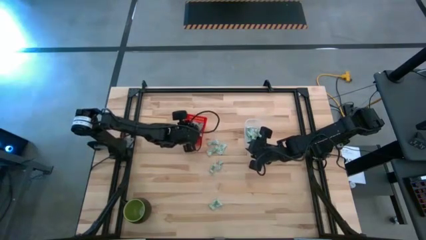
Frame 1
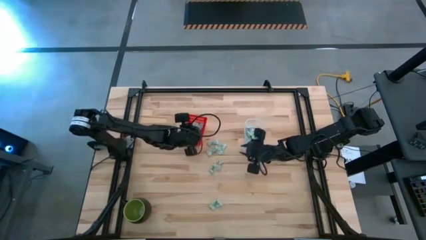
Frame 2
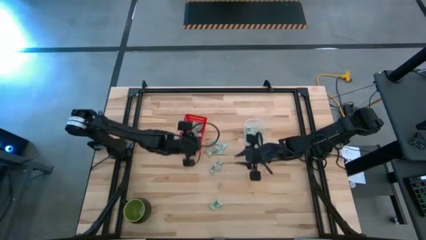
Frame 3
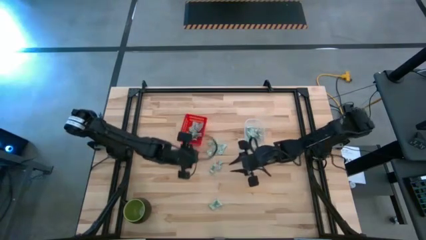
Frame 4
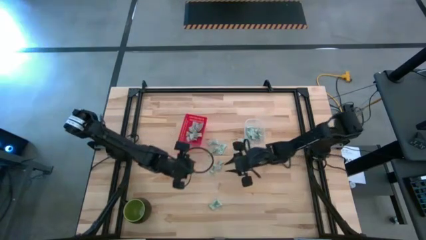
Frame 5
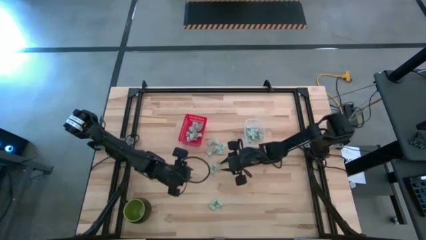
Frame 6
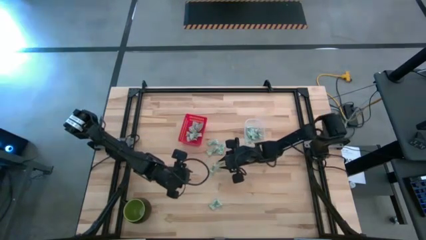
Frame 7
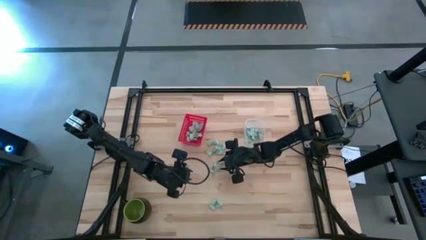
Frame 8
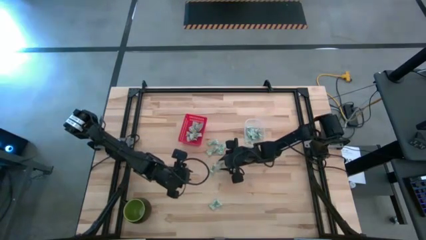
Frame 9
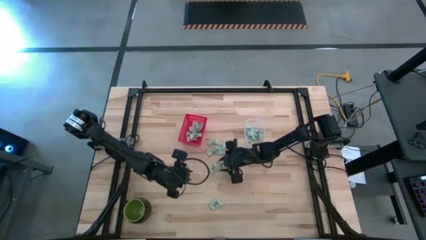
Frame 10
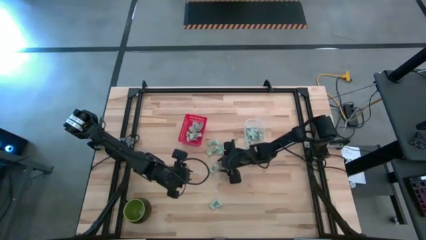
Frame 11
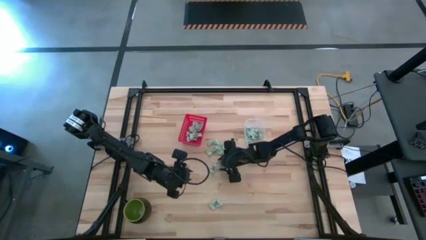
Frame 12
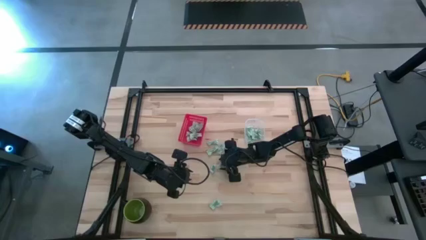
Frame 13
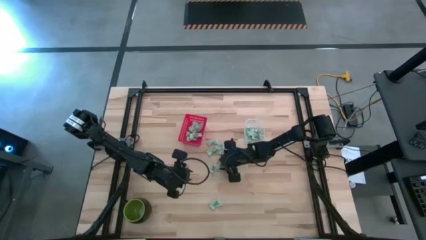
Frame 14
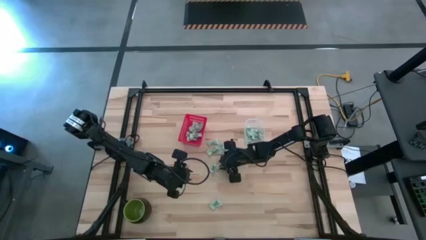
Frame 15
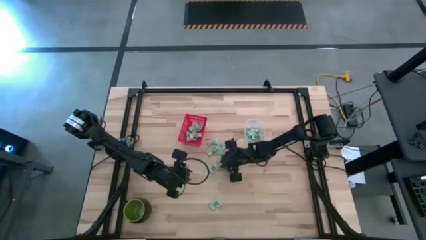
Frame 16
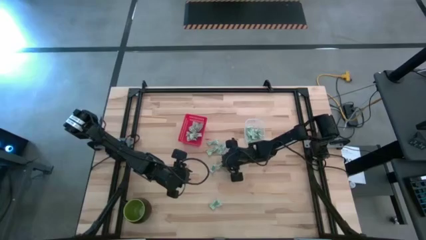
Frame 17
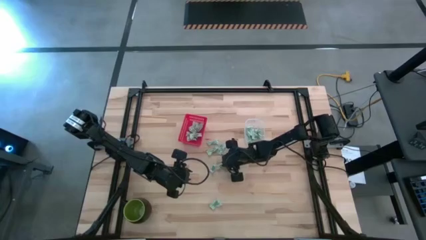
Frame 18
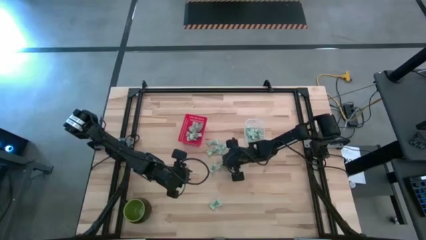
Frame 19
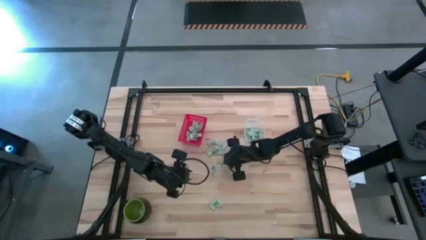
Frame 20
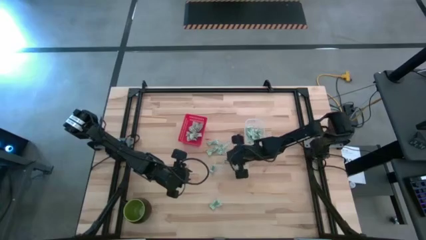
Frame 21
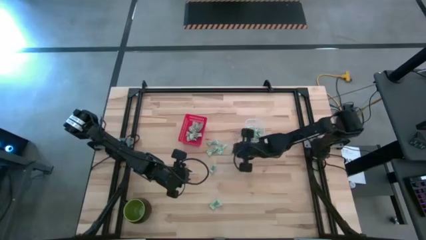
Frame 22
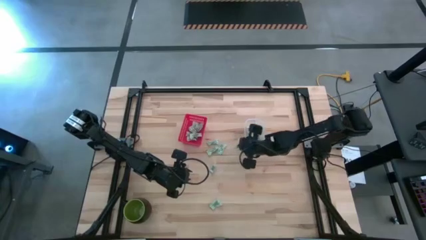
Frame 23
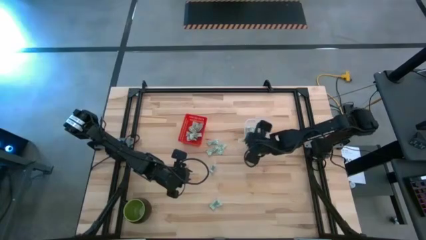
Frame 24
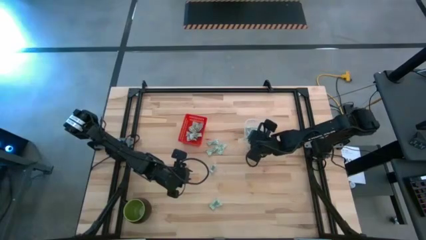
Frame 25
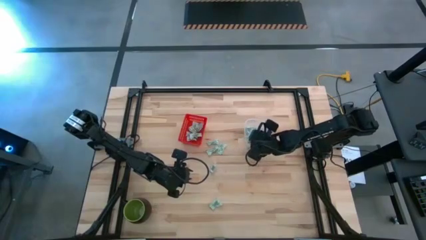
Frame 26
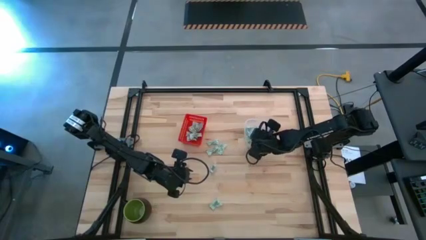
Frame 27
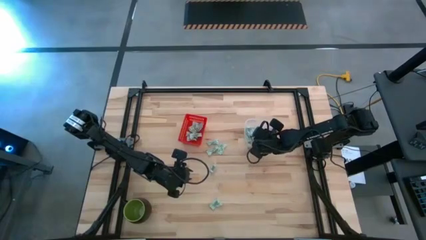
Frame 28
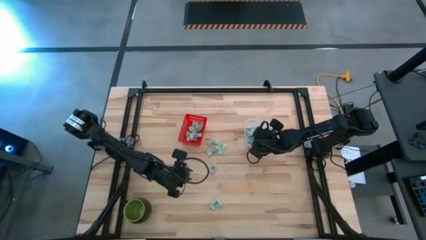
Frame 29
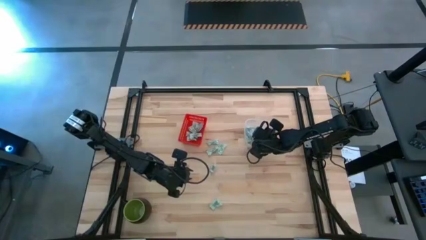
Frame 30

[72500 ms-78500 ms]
Task: Pick and place items into bin
Put the stevia packet into the transparent bin

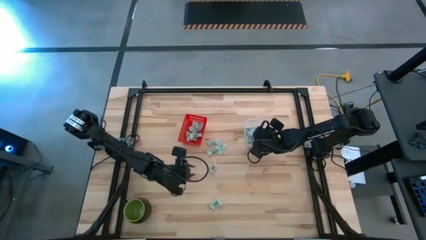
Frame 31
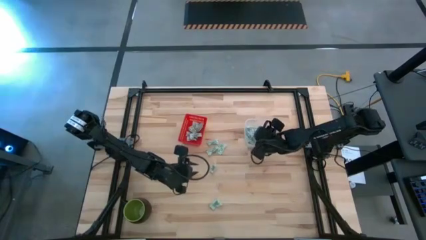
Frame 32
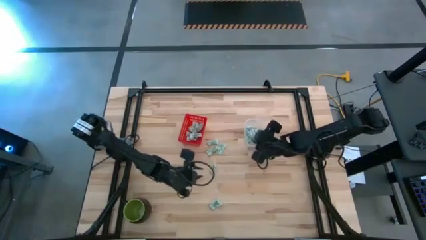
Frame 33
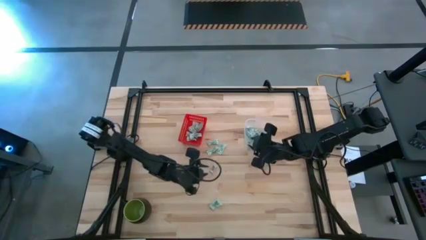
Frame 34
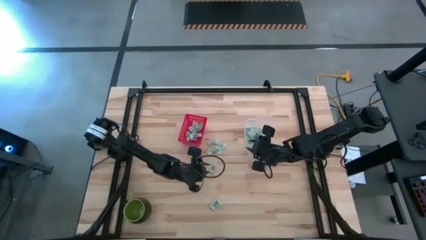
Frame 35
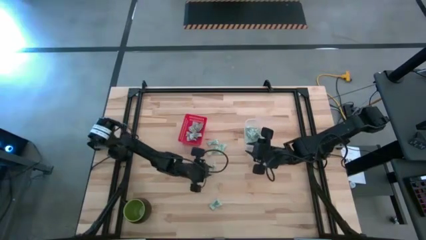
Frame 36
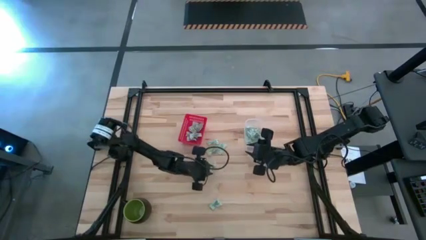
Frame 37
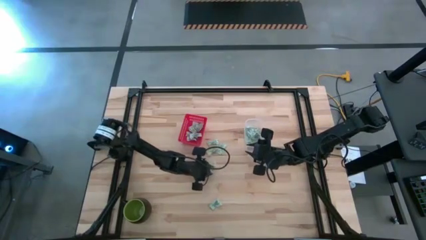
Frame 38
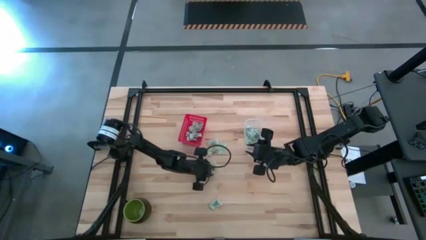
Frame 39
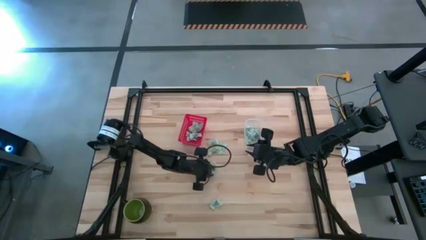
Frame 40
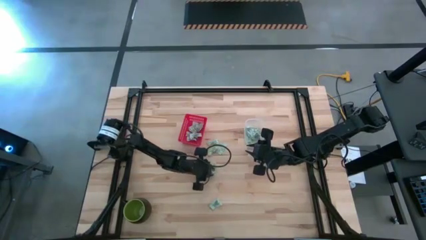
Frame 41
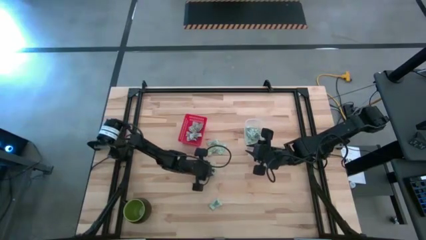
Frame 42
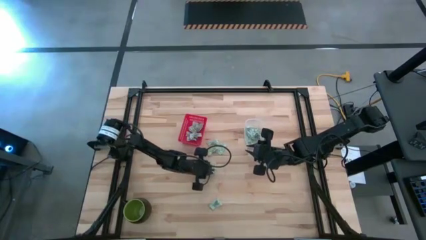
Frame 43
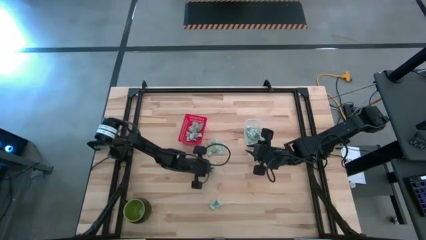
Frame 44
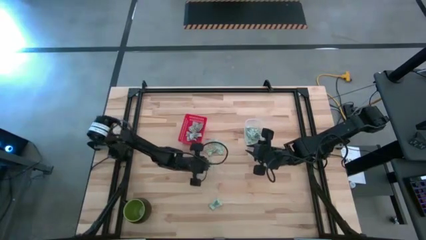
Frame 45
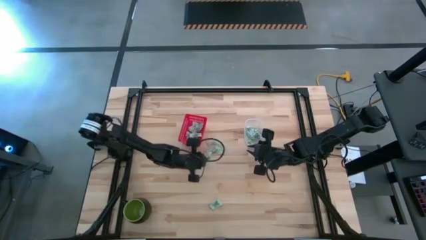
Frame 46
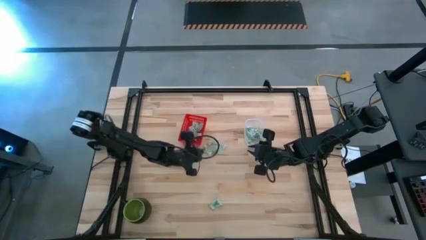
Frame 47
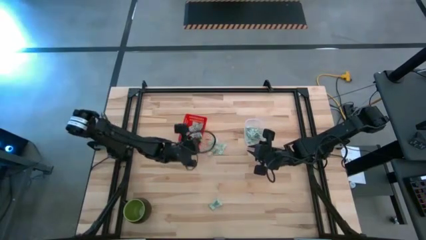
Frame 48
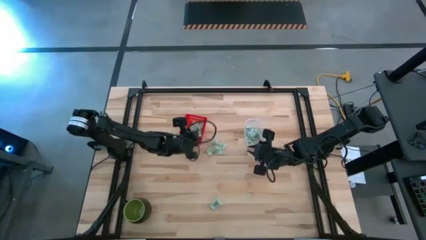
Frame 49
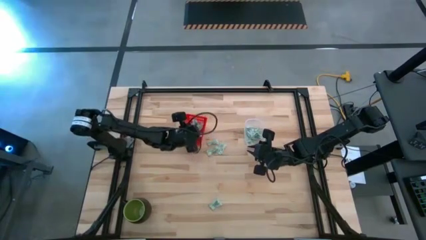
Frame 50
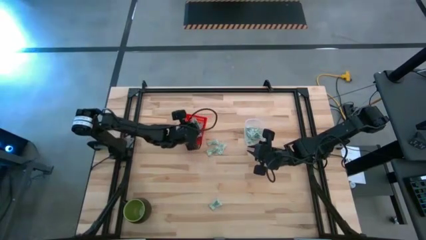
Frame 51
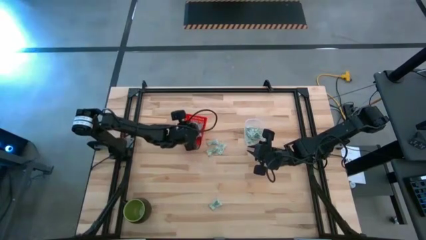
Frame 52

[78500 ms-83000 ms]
Put the stevia packet into the red bin

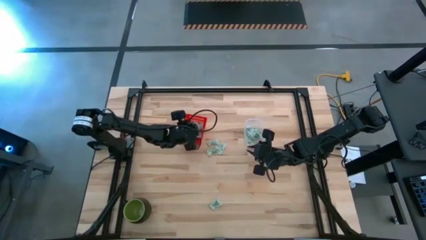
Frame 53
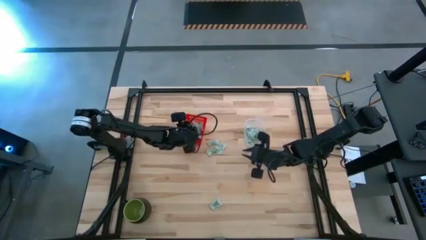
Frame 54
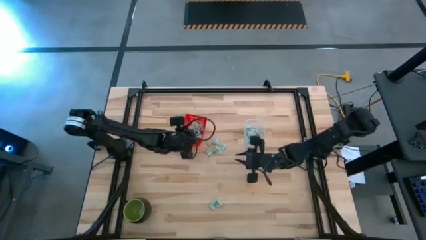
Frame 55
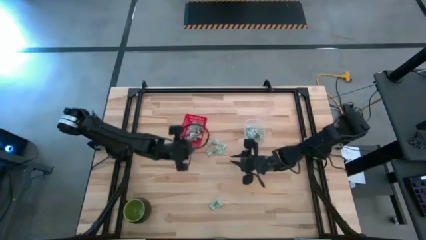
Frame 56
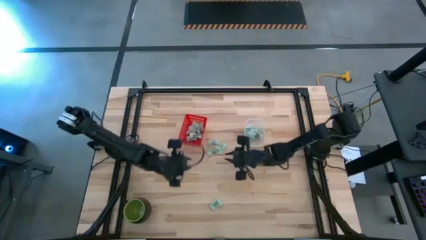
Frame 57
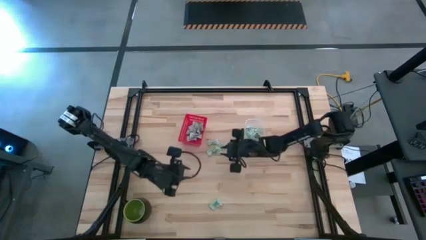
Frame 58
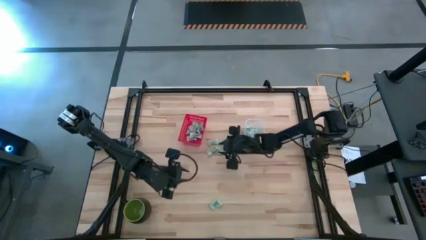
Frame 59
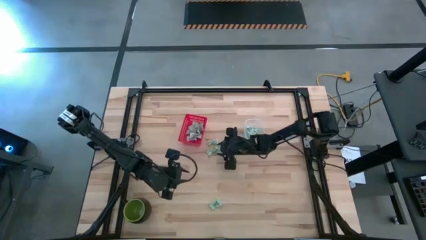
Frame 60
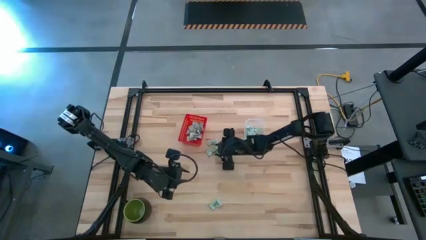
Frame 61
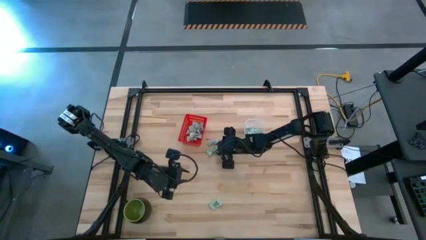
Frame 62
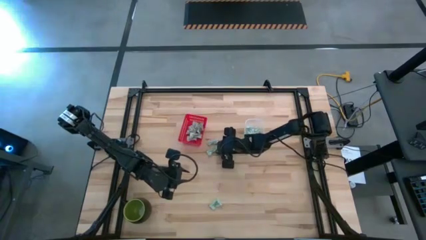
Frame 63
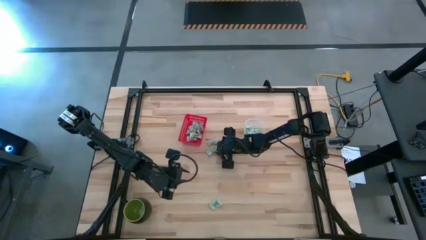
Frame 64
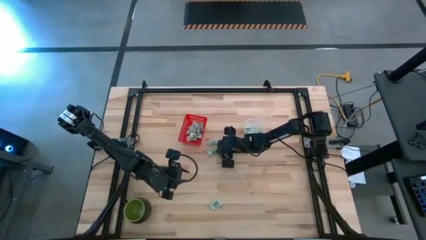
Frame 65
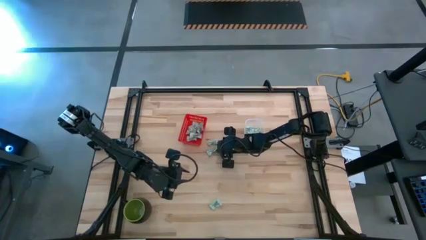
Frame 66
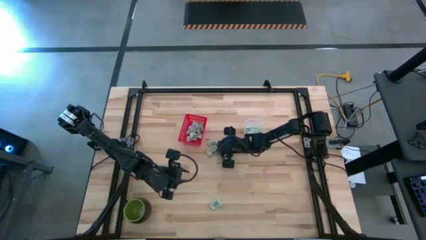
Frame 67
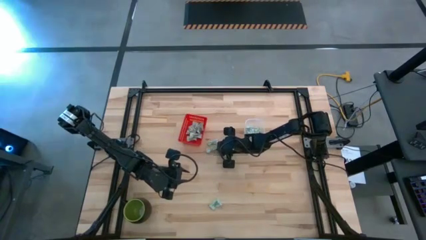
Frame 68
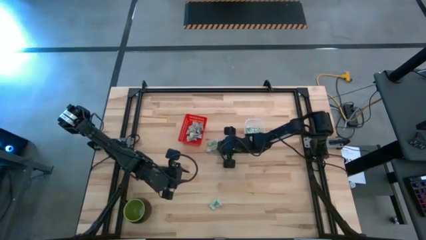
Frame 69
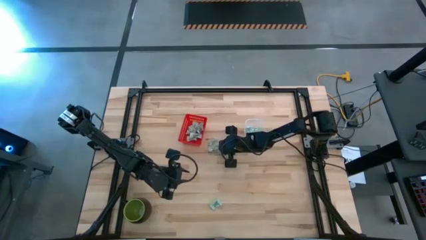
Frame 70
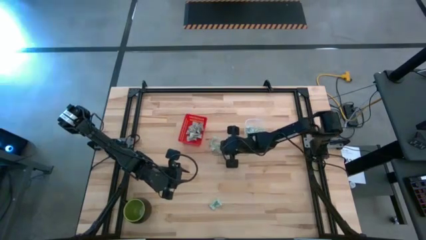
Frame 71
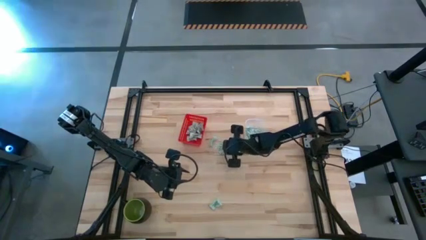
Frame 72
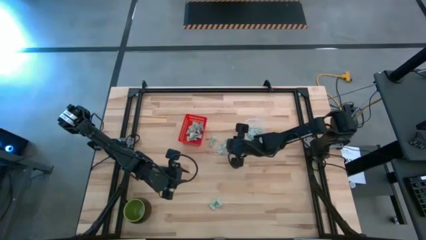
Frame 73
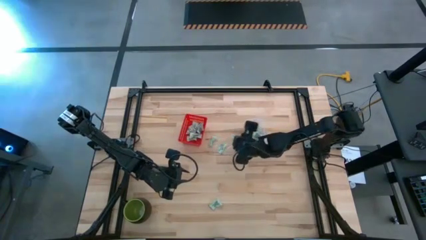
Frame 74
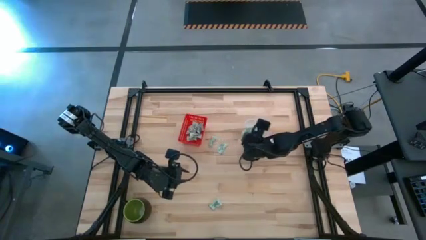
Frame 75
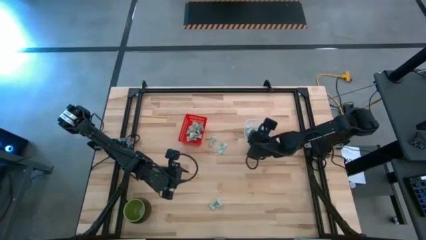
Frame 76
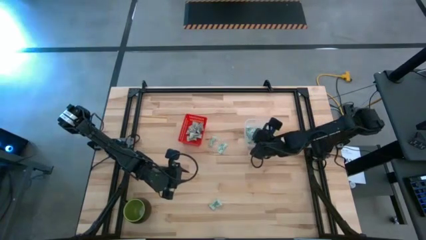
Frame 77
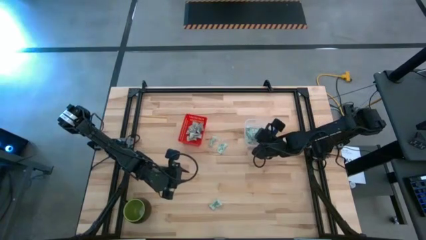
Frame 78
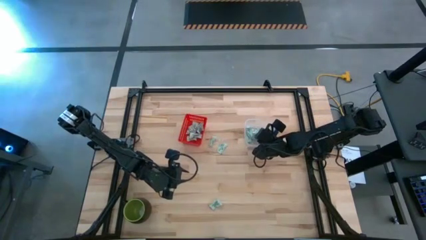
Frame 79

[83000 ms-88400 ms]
Put the stevia packet into the transparent bin

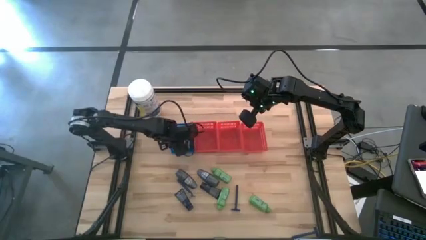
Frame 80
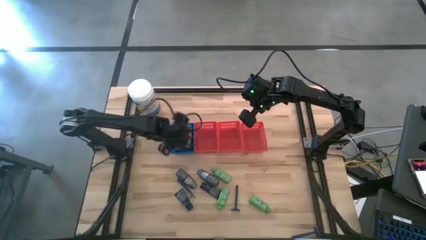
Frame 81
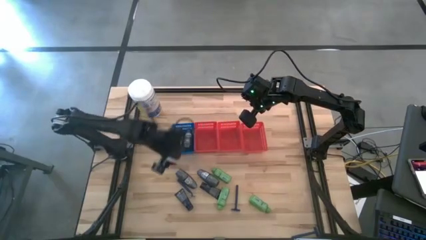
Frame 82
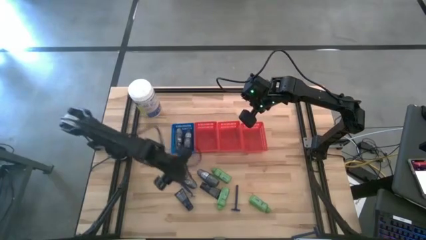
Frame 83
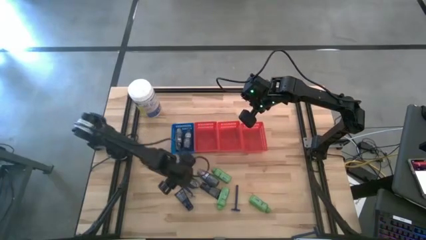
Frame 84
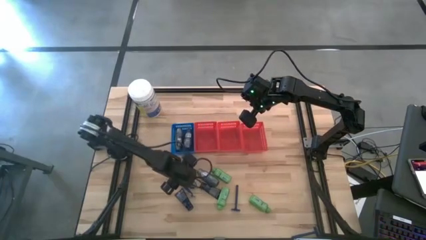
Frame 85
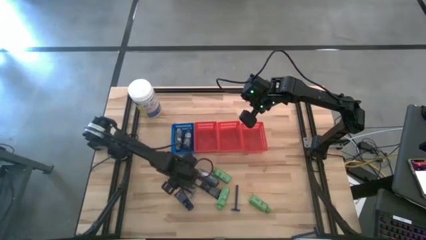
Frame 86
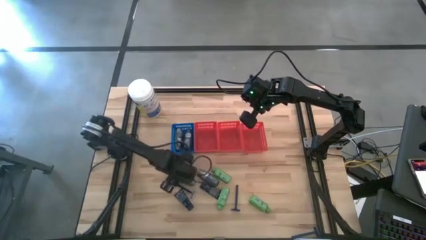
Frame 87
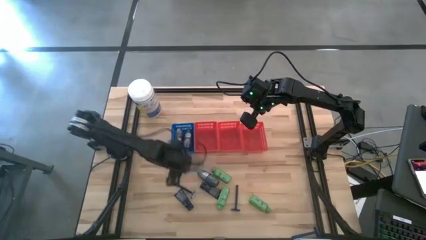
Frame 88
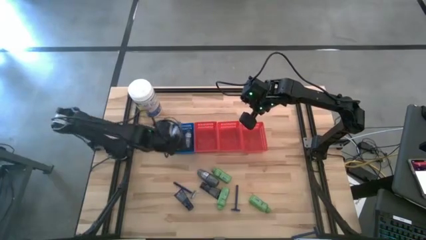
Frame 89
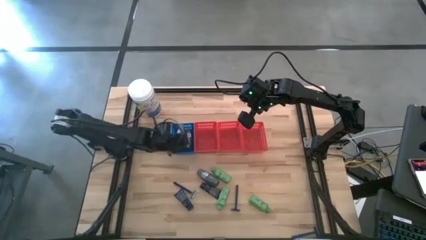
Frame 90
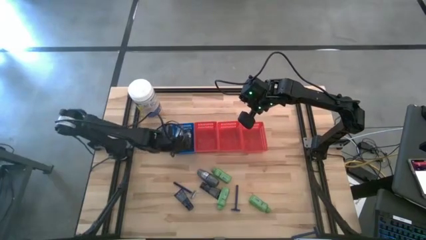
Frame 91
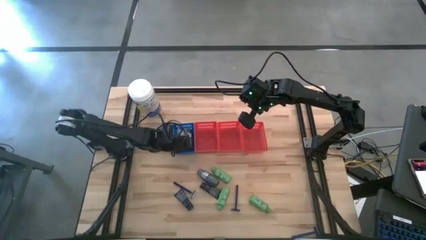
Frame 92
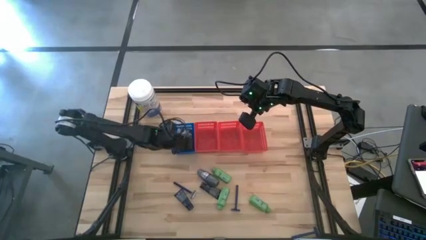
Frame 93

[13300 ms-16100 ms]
Task: Pick & Place Travel size toiletries
Put the deodorant into the blue bin
